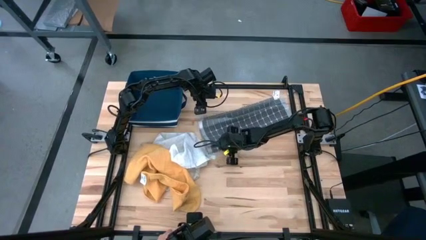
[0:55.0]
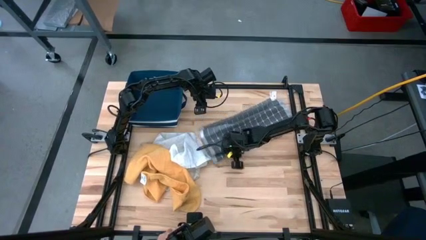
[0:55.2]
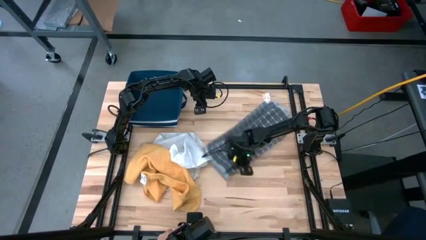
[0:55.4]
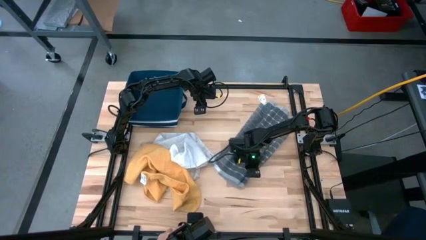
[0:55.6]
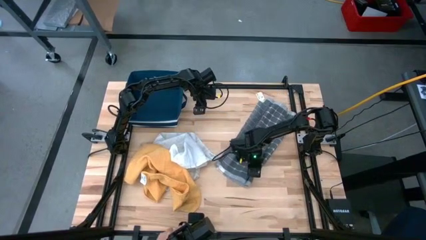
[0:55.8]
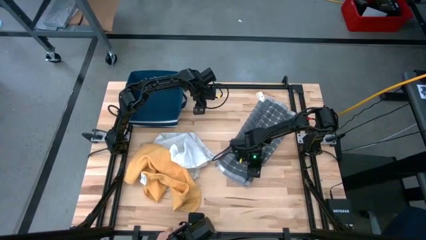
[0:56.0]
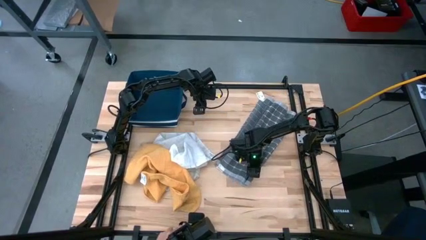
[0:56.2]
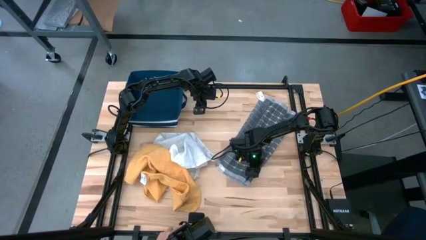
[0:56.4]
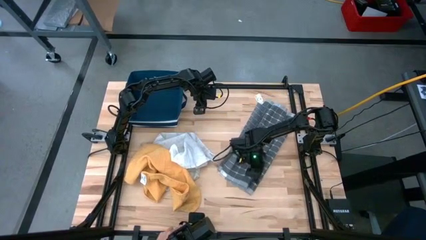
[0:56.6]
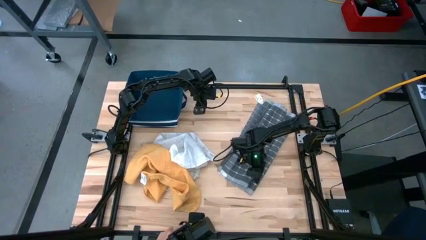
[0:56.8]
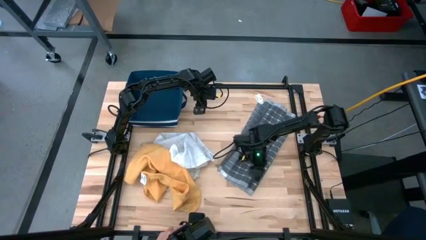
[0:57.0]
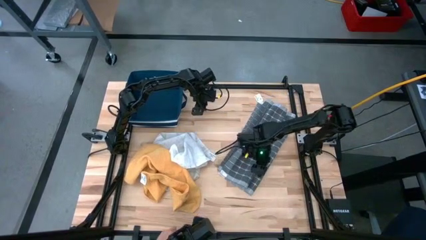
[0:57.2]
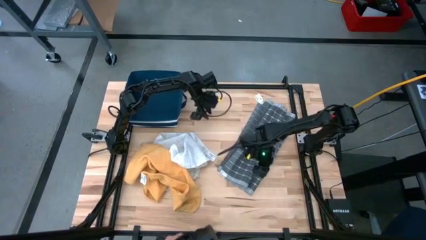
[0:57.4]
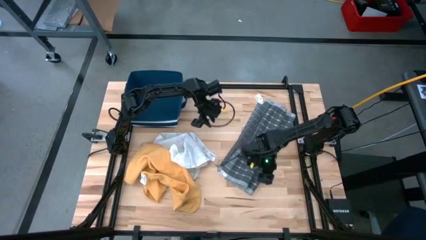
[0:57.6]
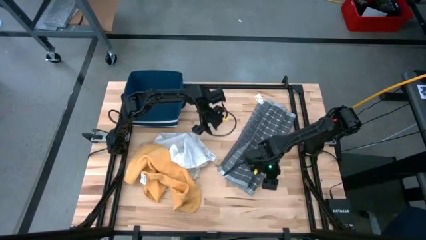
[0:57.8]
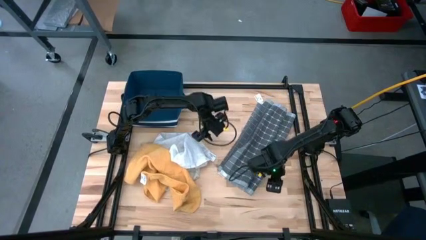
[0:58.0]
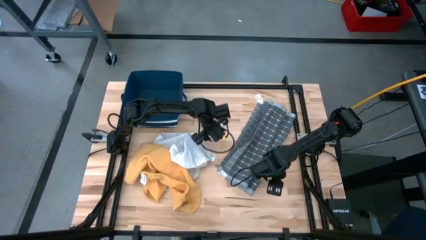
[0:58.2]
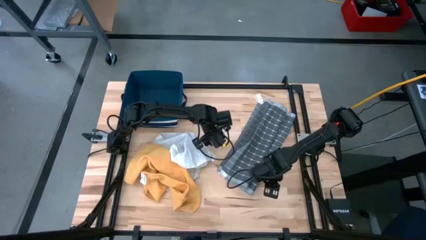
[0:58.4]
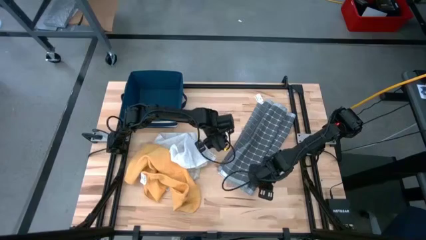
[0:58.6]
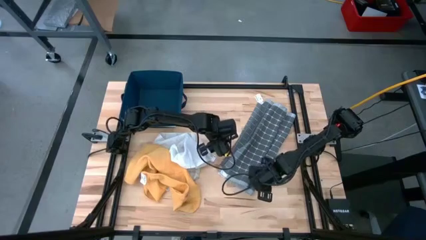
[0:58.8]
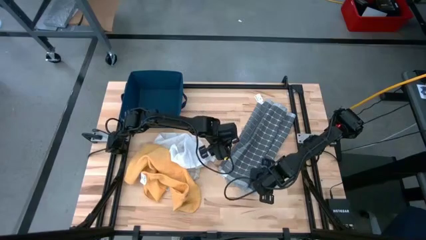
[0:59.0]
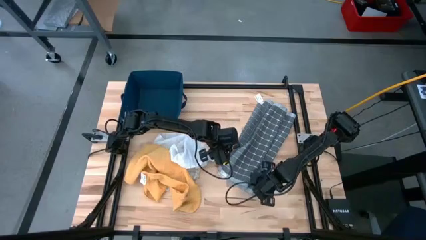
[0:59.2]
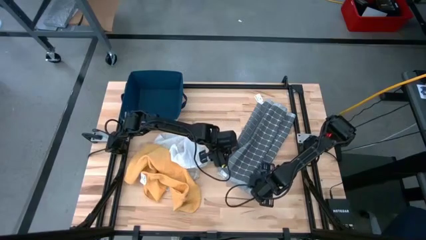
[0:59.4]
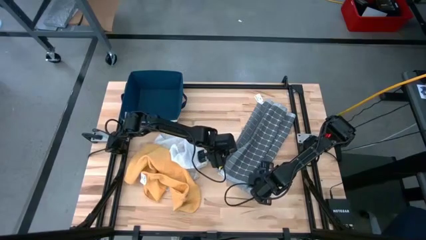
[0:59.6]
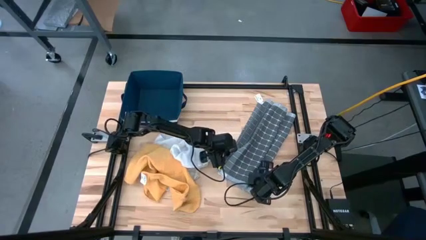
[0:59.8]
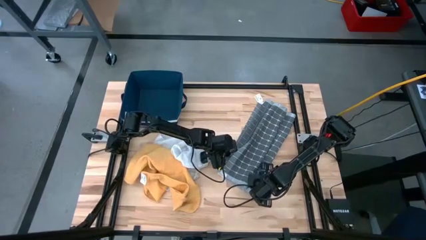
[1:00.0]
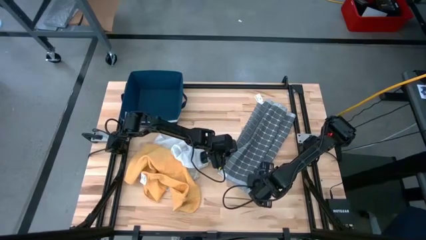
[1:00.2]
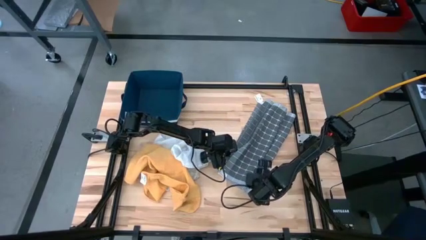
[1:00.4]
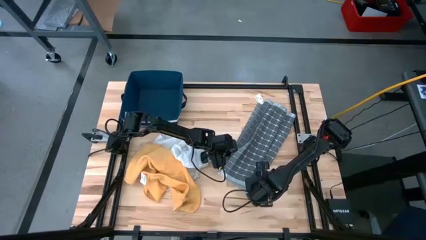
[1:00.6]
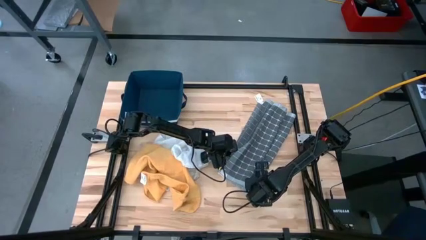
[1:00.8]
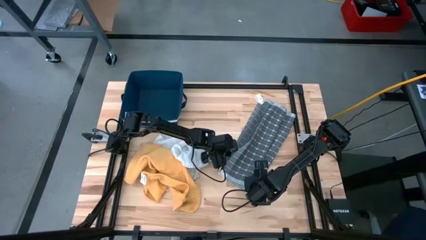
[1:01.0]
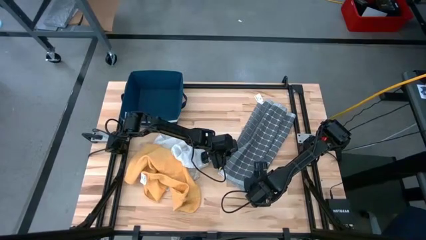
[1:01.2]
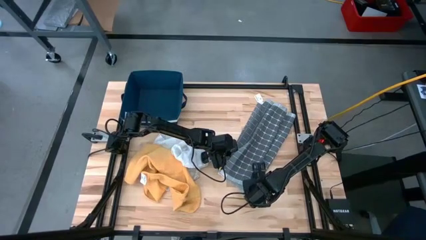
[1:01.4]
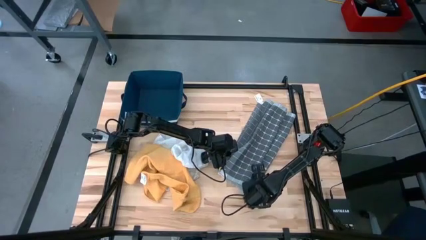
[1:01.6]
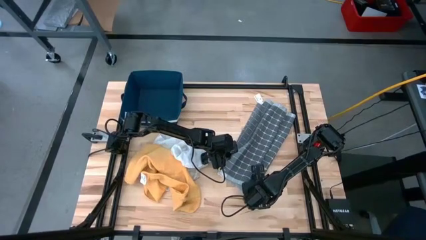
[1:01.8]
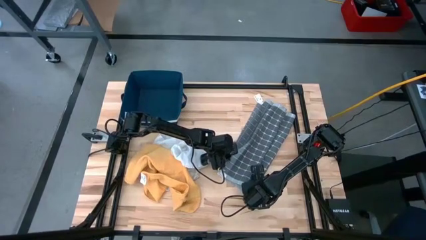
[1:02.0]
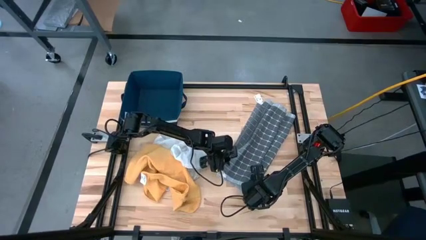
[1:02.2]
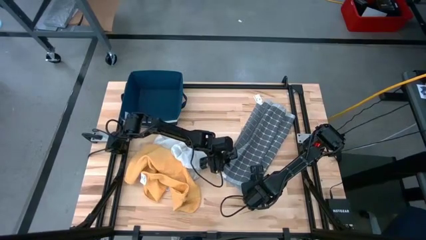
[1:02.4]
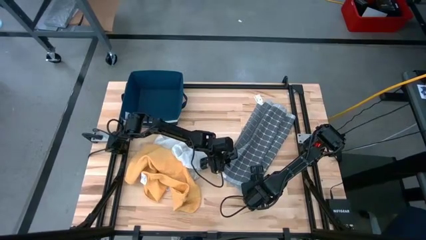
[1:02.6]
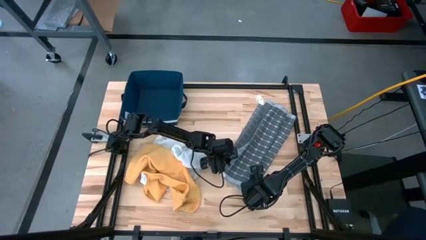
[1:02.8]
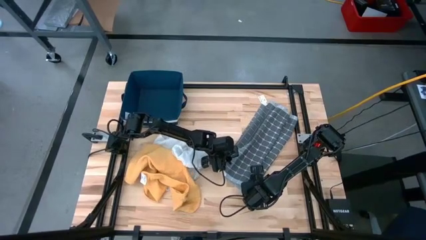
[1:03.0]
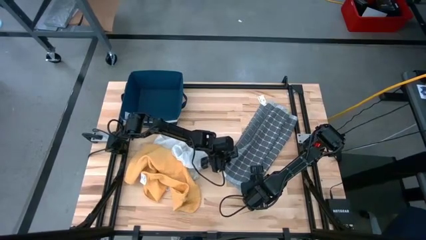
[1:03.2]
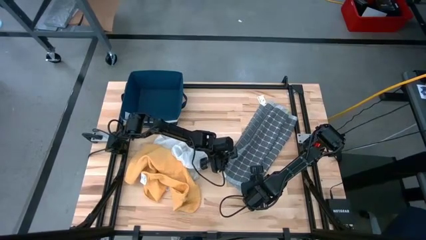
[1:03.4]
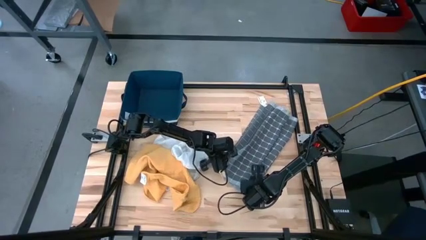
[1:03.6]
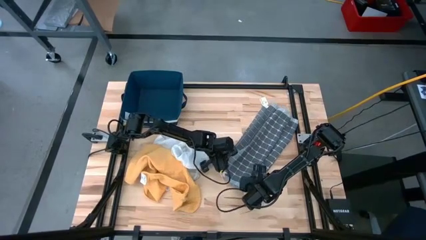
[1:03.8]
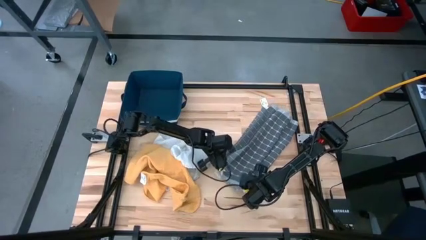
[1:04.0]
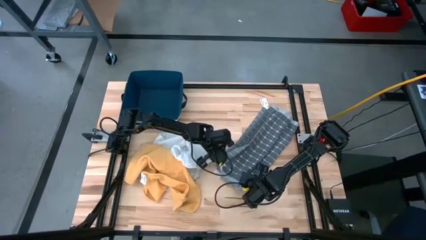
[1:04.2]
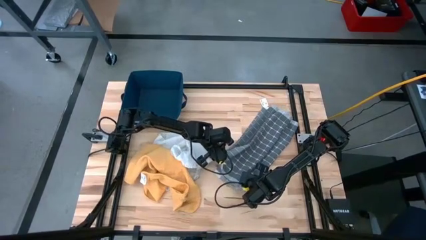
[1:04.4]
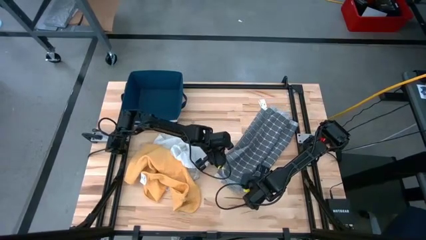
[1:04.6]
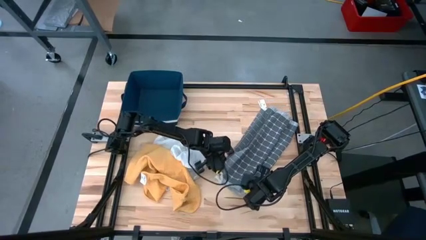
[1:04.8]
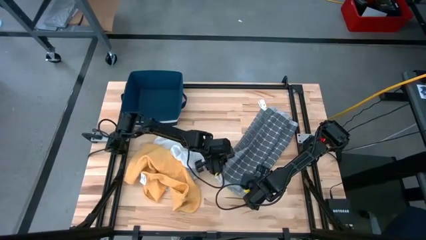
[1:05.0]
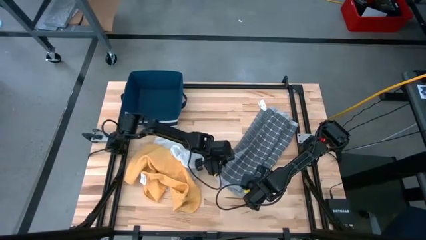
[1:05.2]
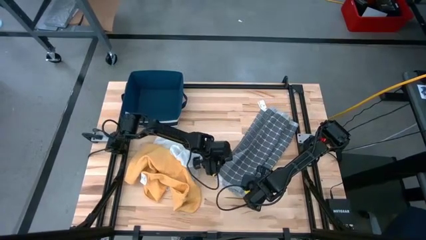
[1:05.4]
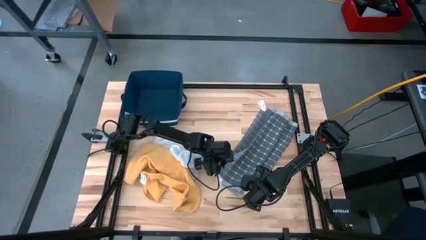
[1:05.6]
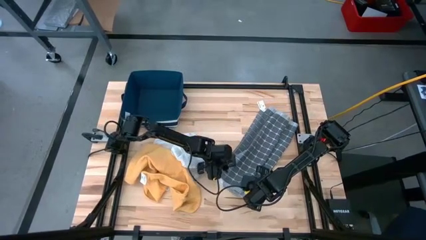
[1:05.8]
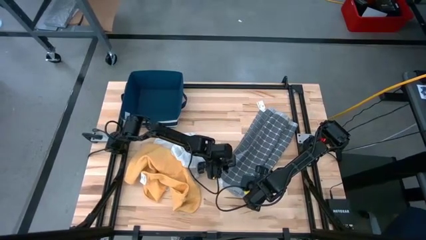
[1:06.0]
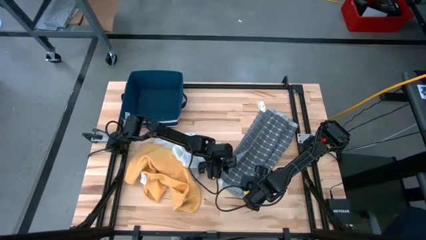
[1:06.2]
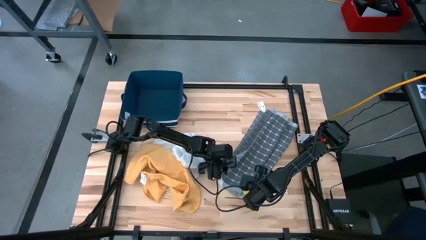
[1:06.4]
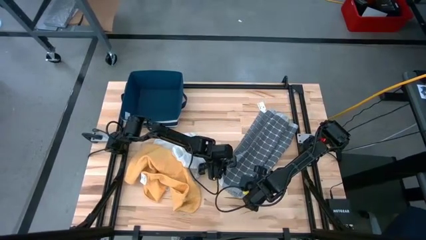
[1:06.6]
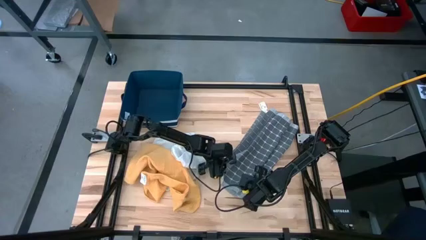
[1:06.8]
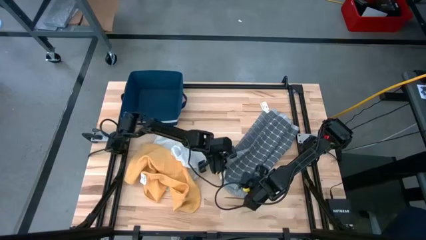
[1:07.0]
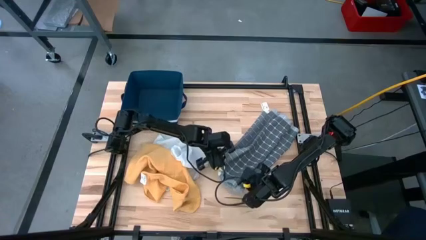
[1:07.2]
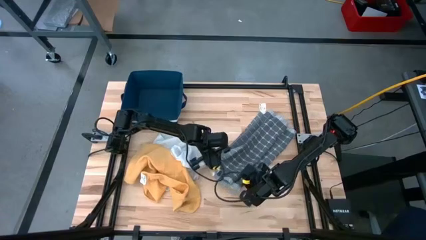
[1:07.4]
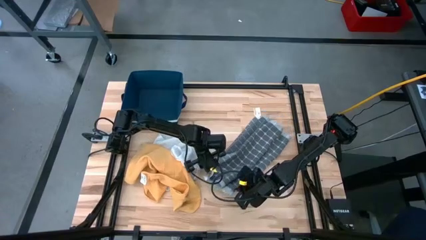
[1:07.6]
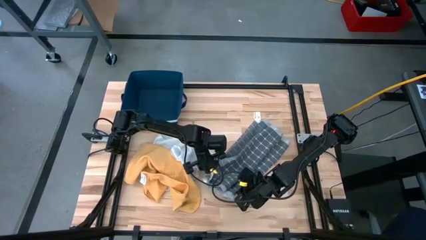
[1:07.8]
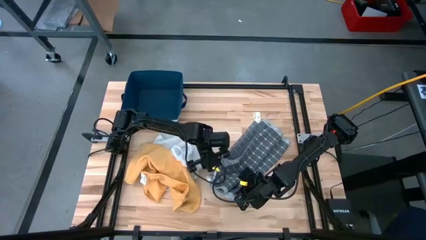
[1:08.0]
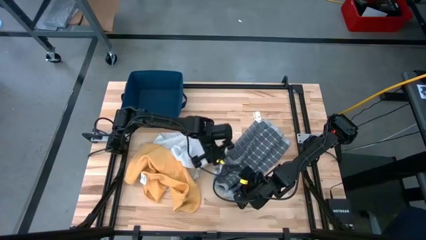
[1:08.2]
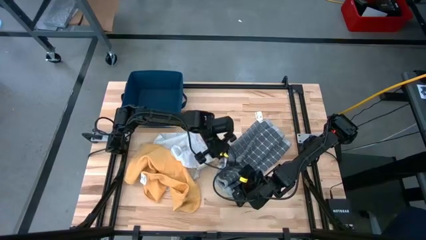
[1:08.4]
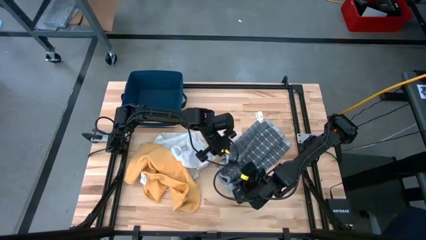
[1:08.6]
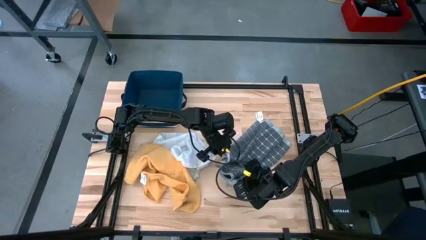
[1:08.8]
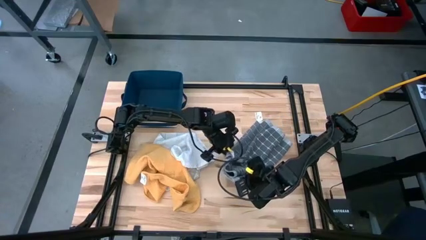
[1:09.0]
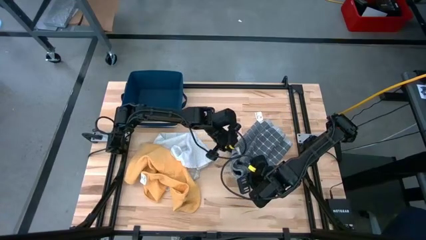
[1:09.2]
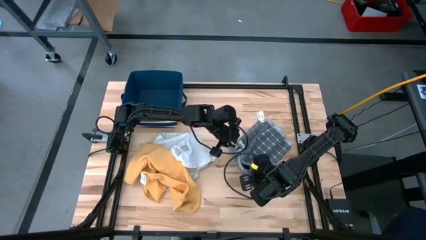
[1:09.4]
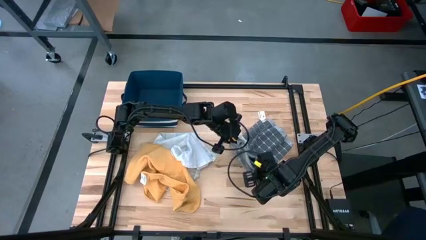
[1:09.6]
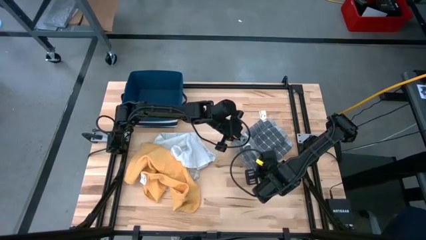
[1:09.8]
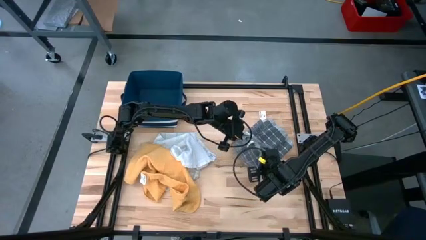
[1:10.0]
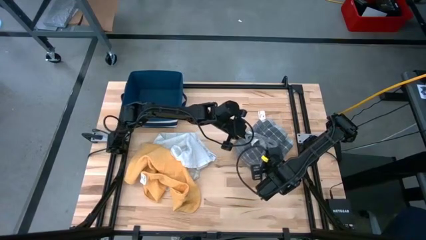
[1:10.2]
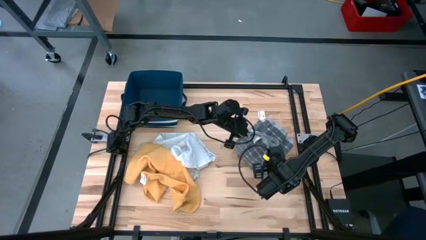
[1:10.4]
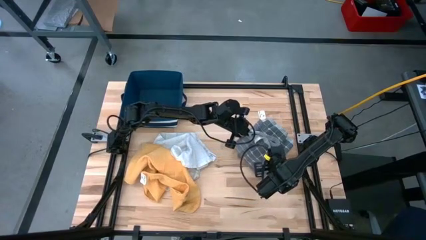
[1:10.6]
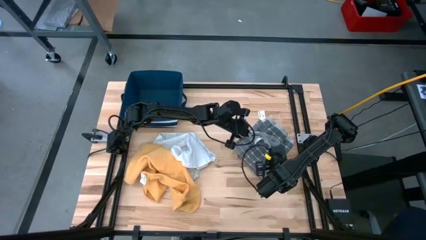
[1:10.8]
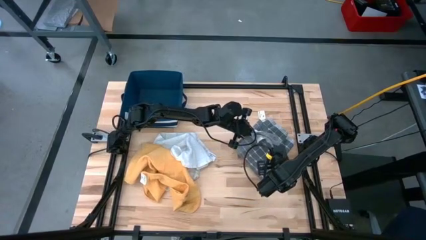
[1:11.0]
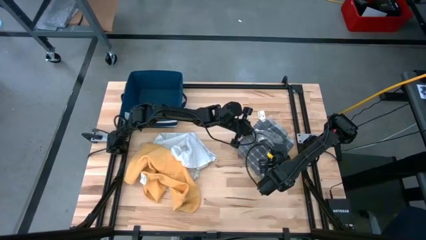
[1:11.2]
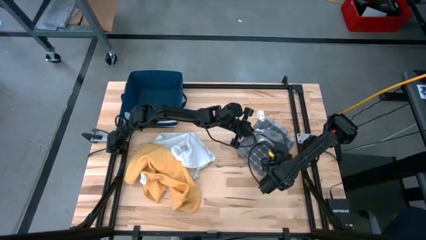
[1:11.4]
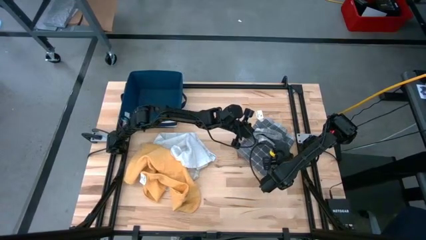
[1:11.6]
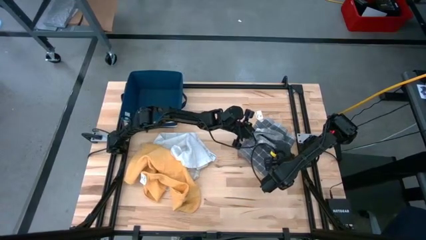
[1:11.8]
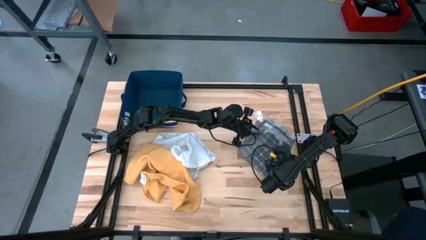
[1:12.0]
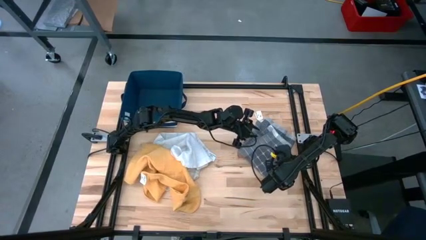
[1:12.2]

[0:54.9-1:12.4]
Task: Fold towel
Fold the gray towel
